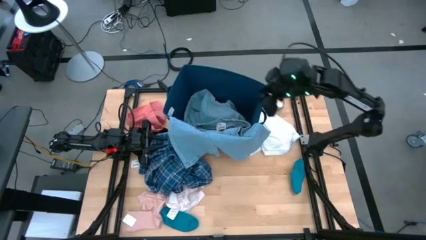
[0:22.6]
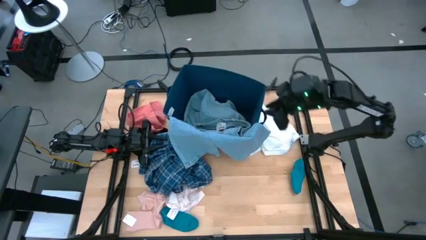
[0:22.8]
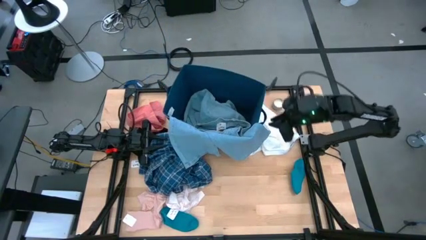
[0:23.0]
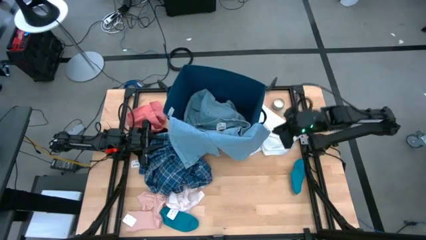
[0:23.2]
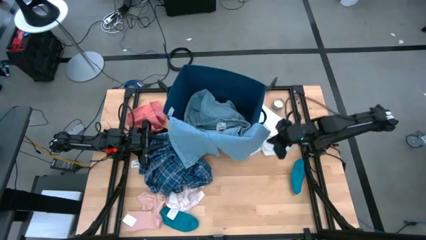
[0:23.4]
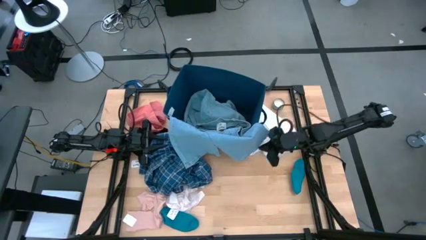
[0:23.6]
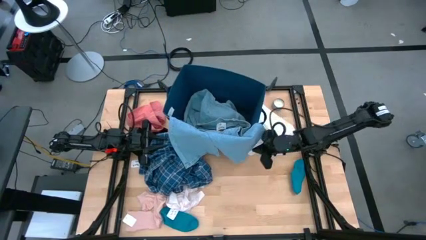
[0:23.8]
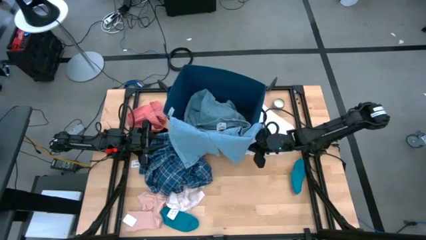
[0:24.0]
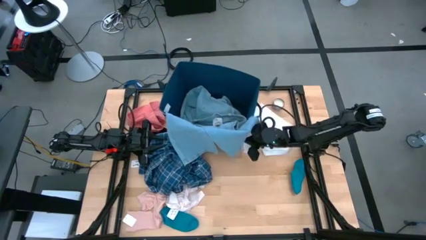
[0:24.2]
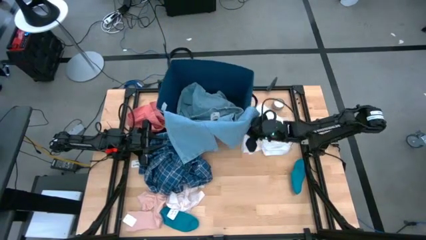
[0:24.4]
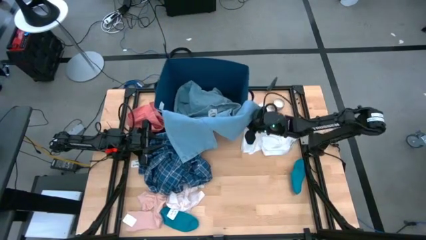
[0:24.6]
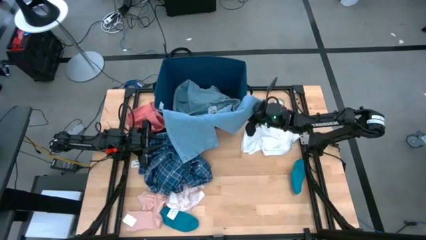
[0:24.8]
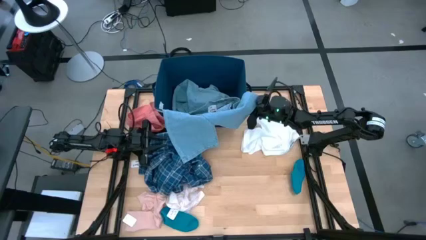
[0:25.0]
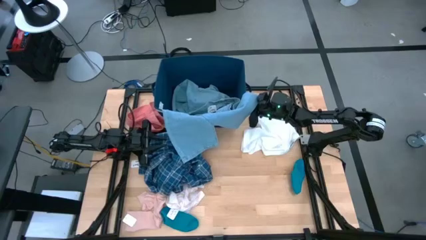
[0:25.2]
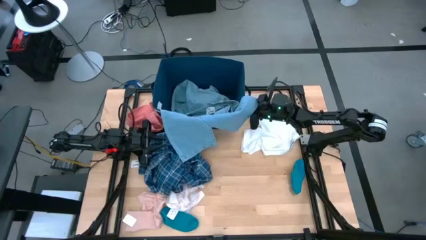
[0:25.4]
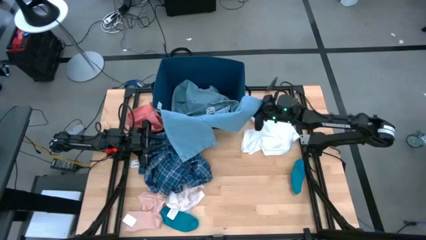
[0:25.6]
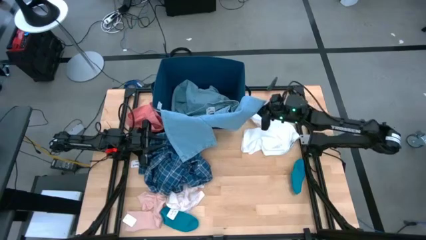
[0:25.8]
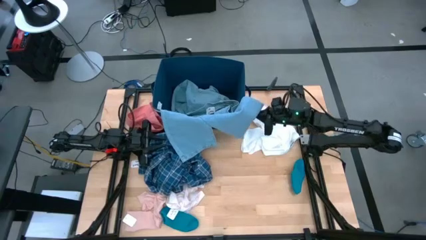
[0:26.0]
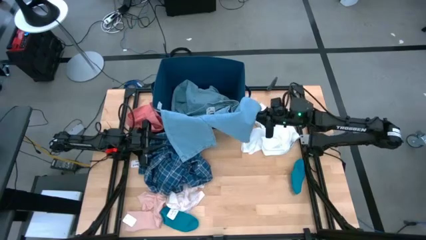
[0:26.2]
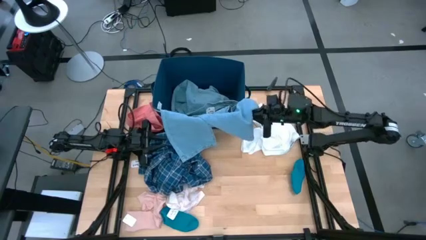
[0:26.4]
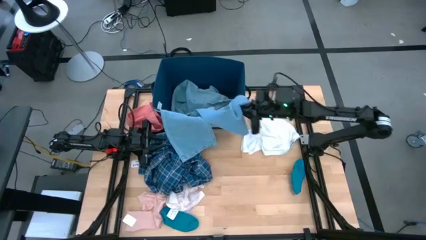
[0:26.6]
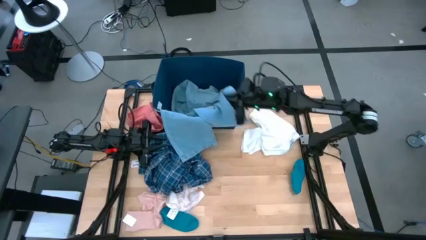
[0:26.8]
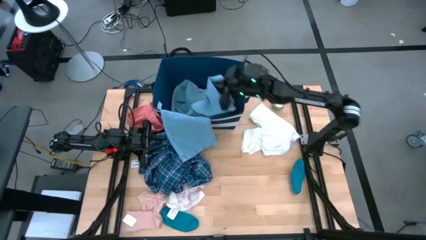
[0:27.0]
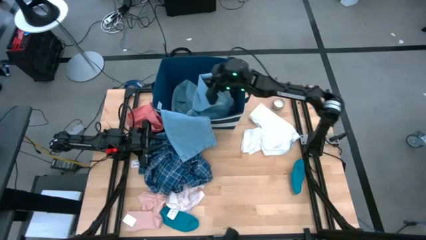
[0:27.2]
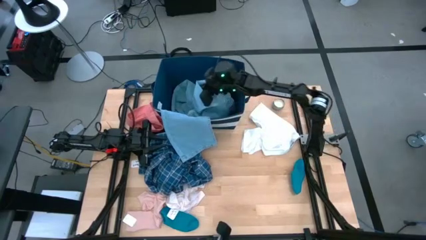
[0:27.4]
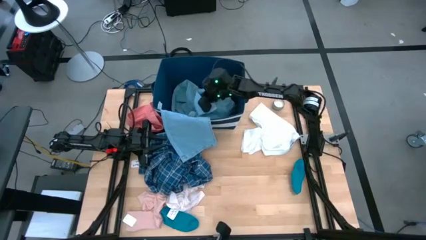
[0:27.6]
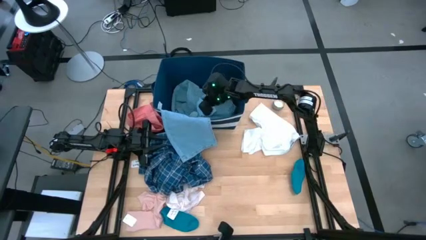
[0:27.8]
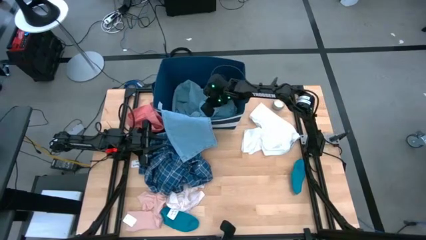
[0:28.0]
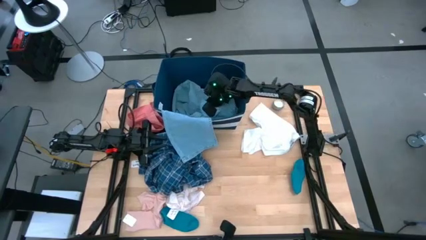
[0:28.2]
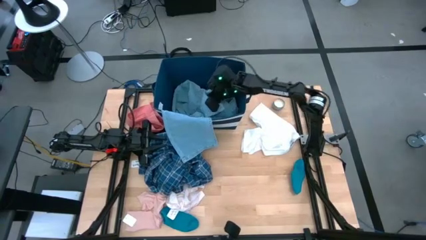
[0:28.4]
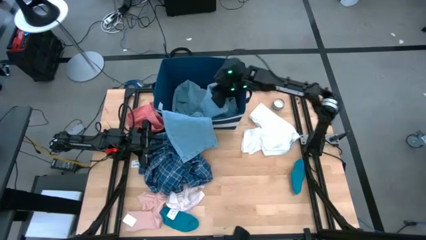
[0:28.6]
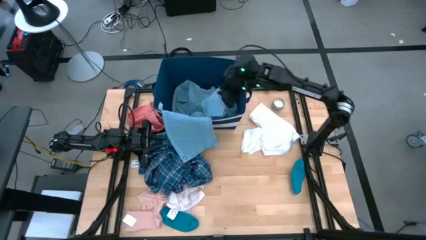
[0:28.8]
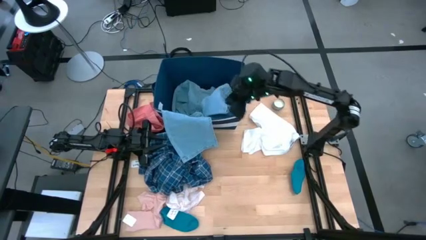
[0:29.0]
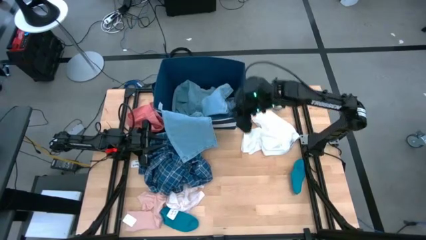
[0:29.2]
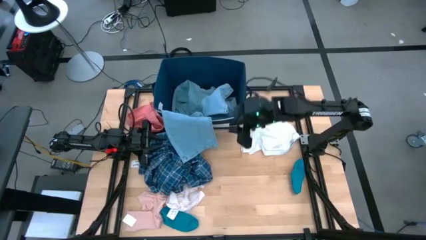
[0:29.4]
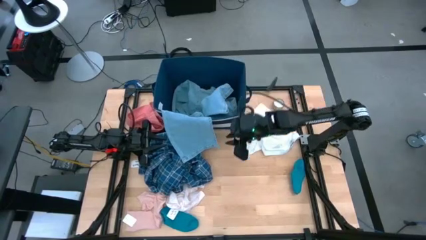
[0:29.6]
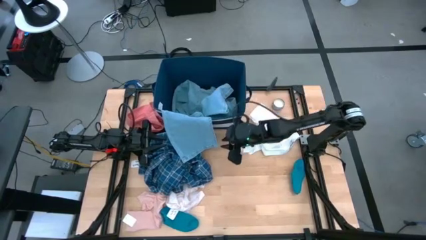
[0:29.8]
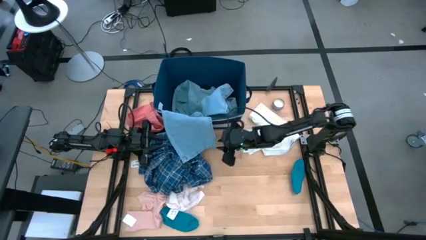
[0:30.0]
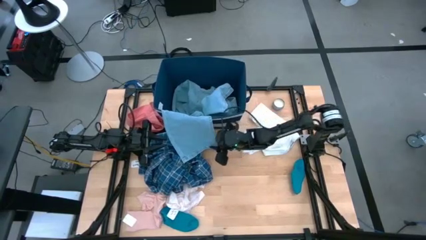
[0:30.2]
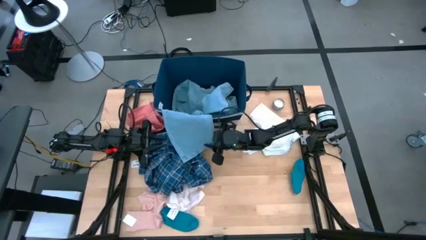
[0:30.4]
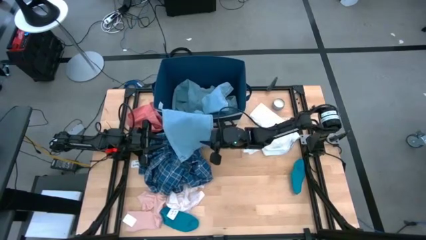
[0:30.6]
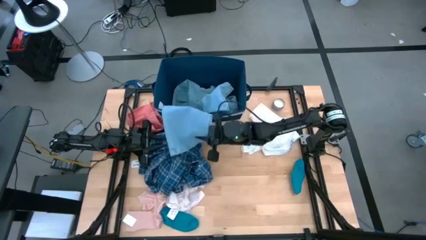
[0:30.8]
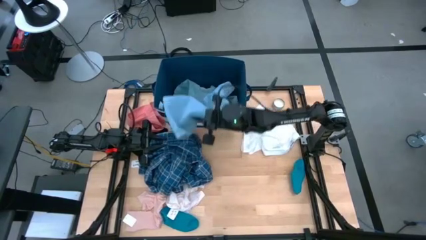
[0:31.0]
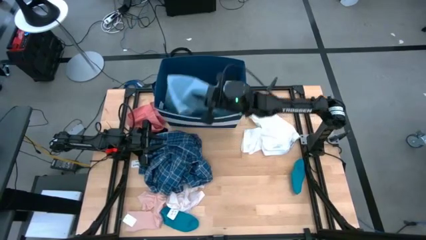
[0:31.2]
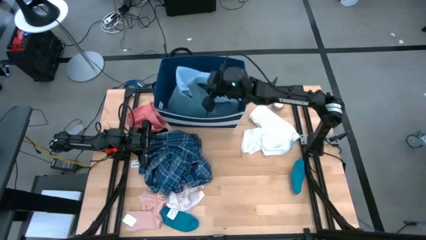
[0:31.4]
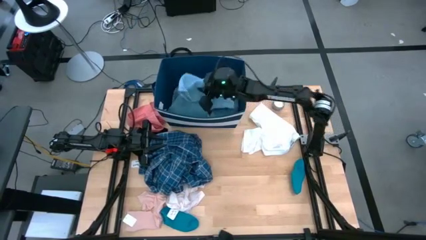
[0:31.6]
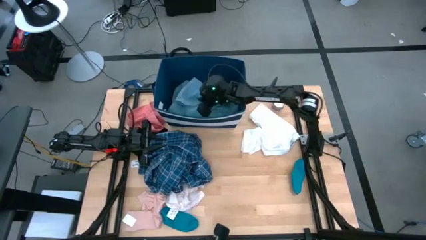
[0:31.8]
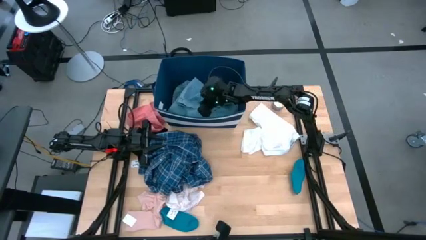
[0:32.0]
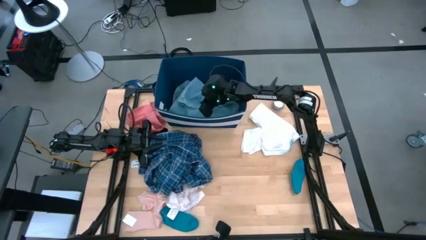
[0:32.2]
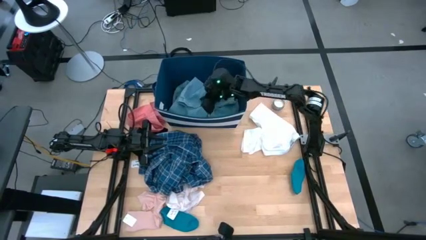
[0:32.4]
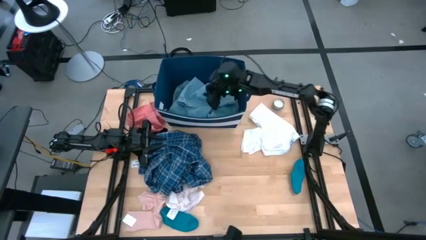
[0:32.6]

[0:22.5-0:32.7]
Task: Sort clothes
Put the blue jeans into the blue laundry bin

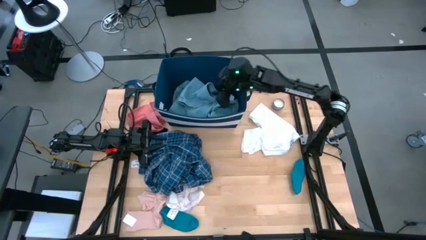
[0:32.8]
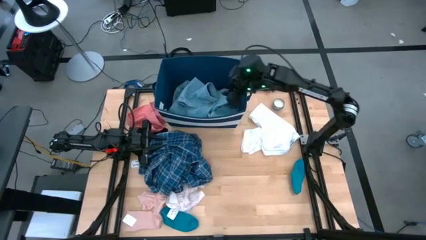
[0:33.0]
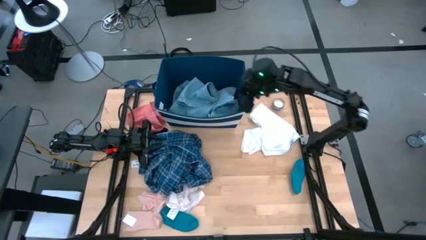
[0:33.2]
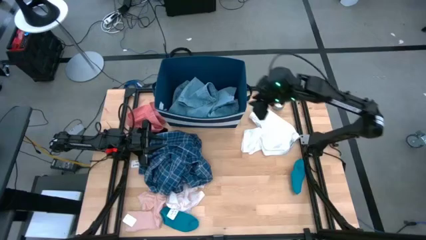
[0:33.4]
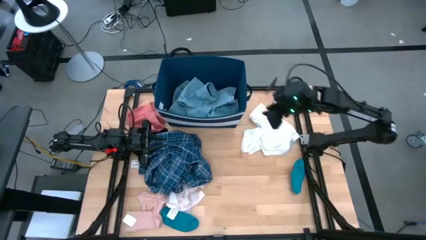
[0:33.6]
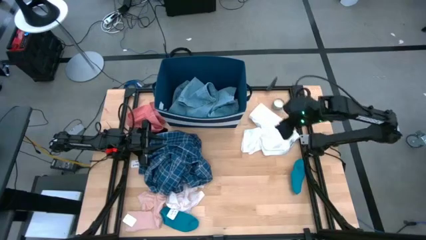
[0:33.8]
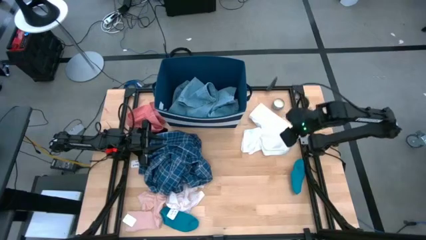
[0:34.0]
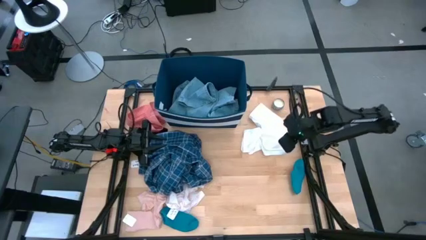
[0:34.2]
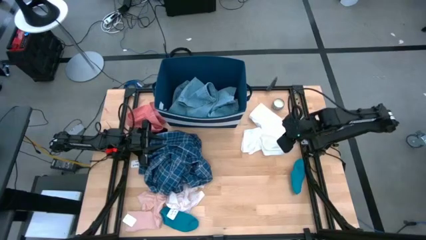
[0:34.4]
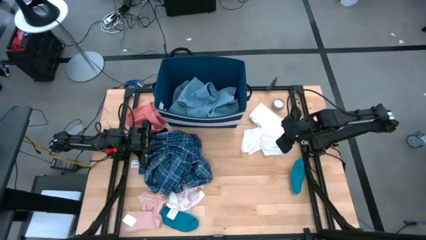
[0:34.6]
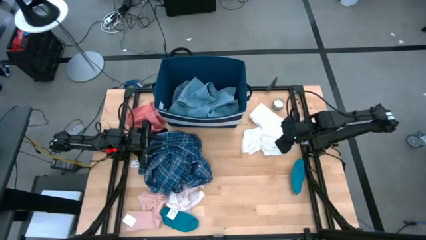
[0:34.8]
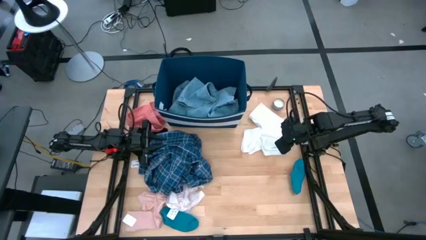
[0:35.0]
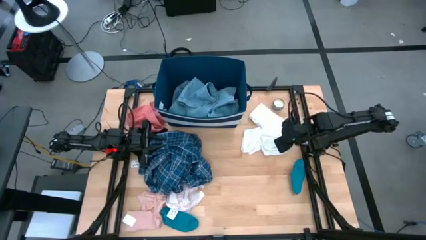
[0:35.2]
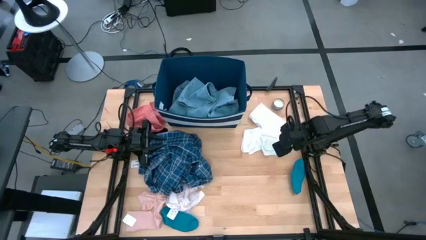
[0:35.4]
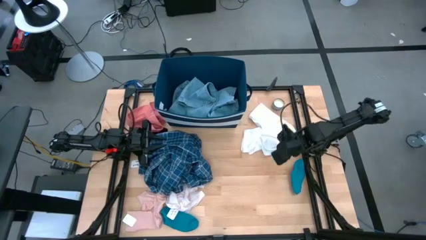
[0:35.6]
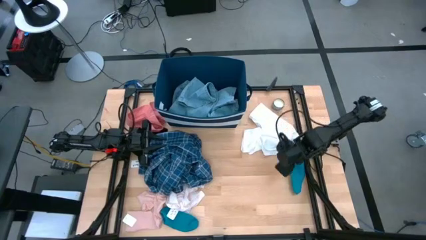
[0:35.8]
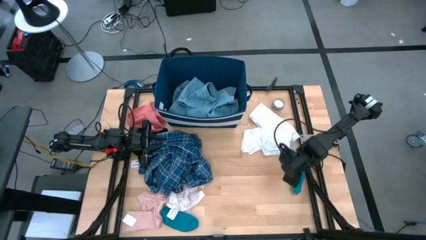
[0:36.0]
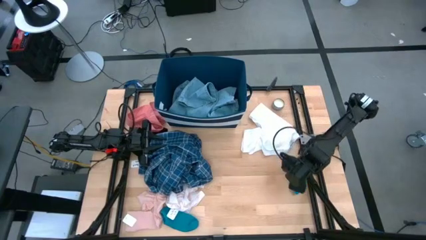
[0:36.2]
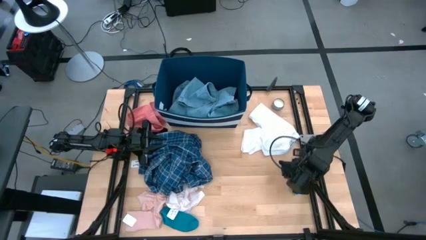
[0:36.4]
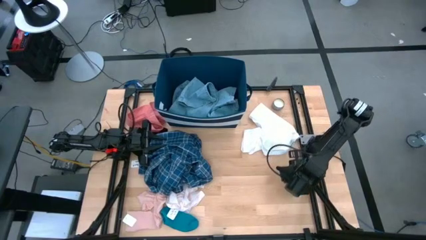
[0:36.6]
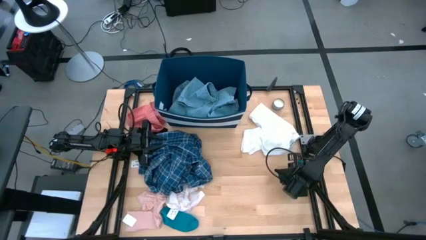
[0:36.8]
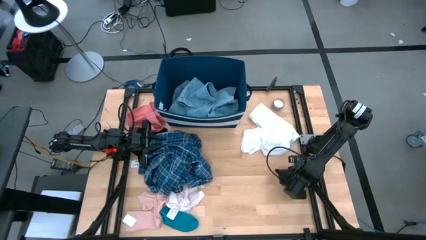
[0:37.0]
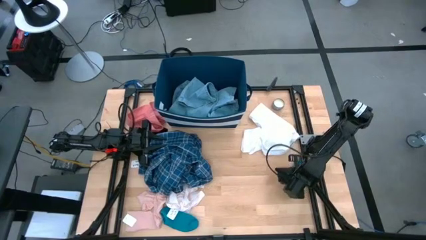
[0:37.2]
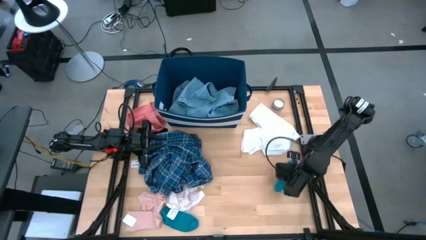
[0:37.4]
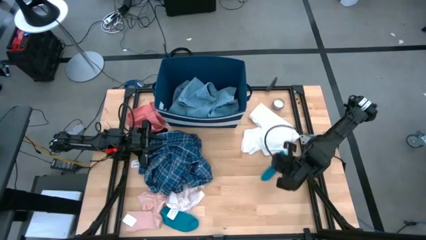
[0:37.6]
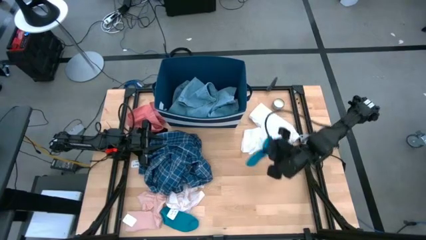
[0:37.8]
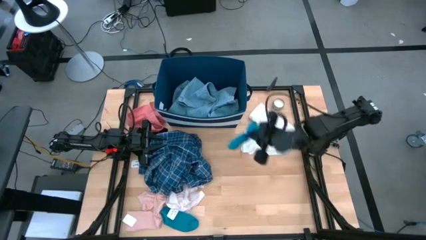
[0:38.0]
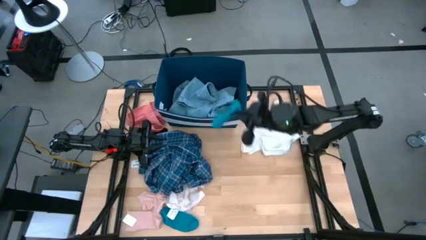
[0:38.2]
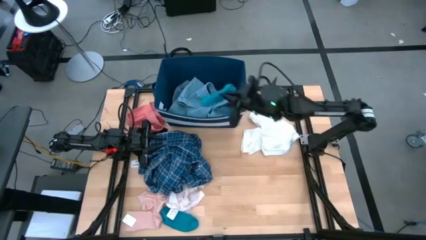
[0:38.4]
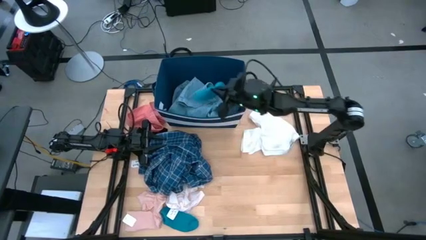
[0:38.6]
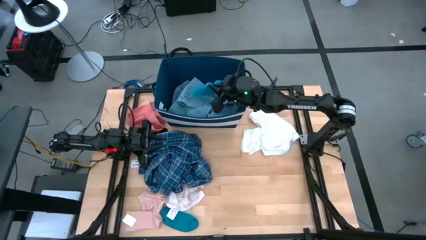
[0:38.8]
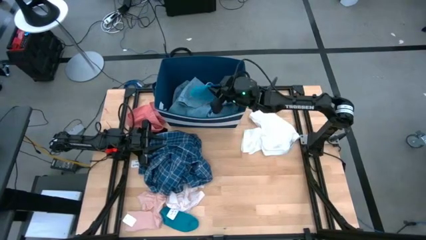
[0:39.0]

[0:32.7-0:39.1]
Put the blue sock into the blue laundry bin
